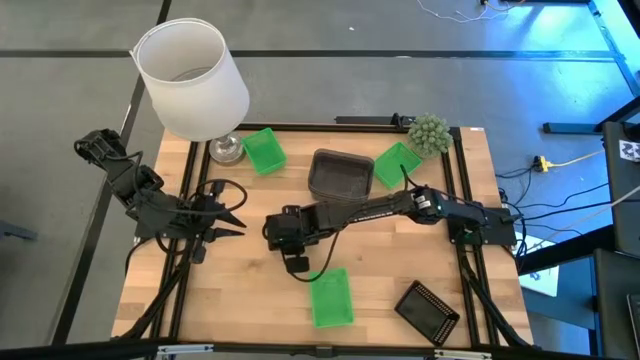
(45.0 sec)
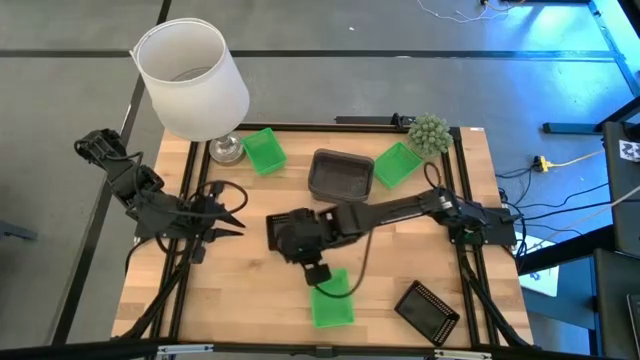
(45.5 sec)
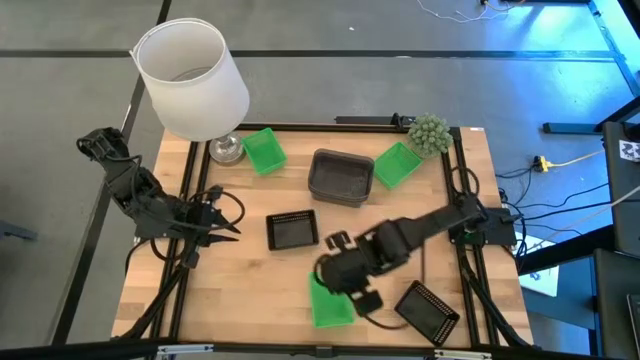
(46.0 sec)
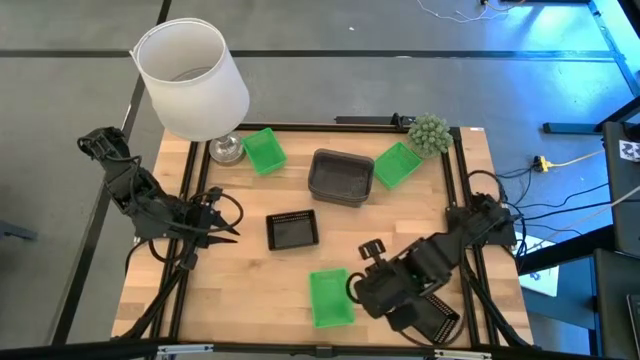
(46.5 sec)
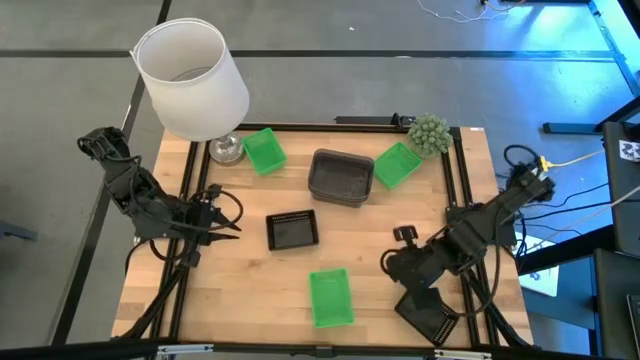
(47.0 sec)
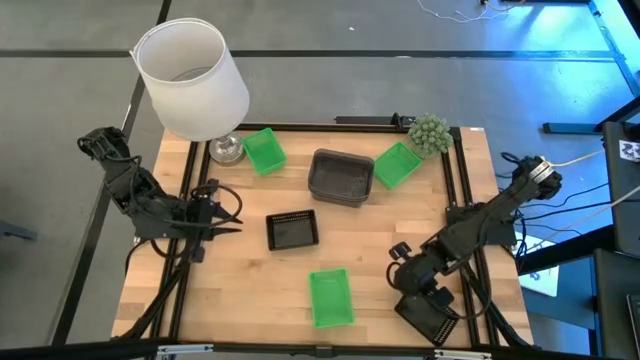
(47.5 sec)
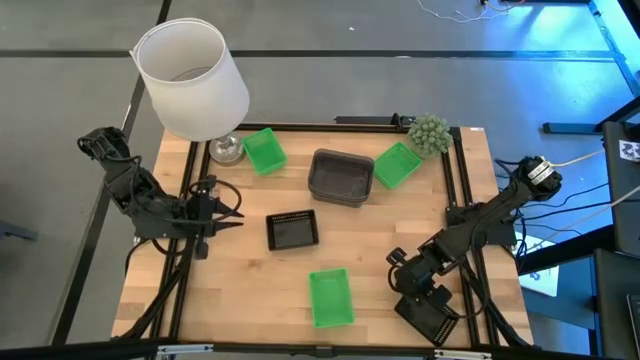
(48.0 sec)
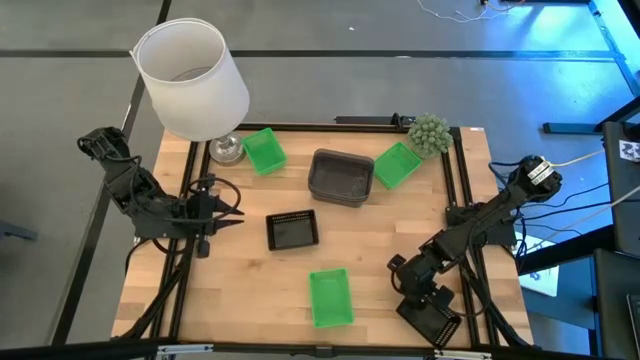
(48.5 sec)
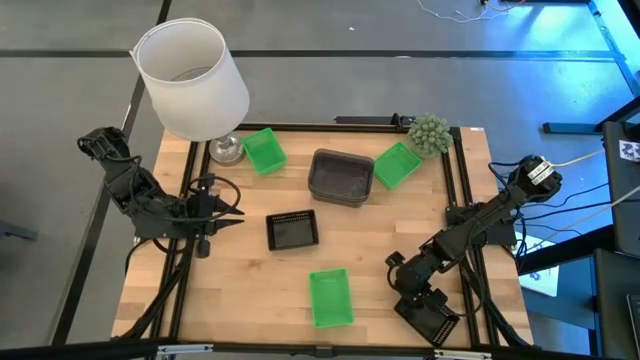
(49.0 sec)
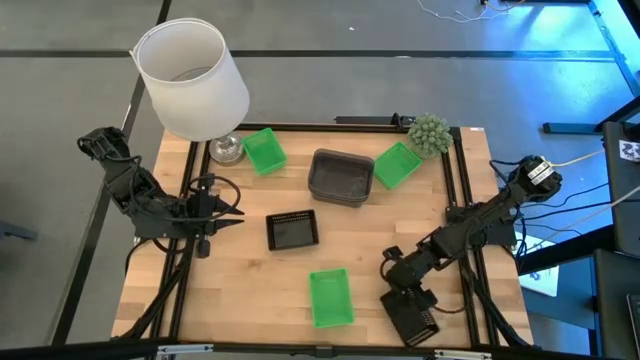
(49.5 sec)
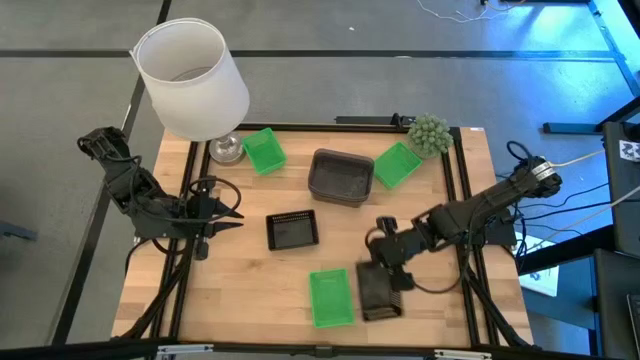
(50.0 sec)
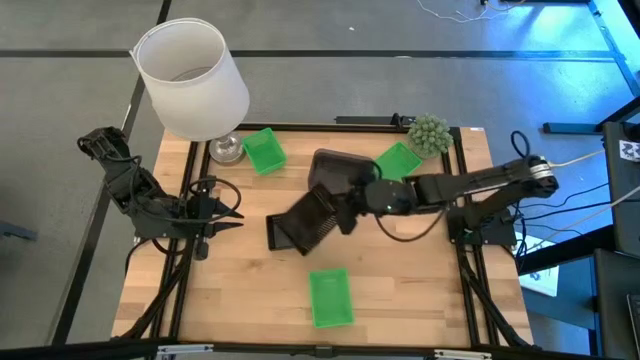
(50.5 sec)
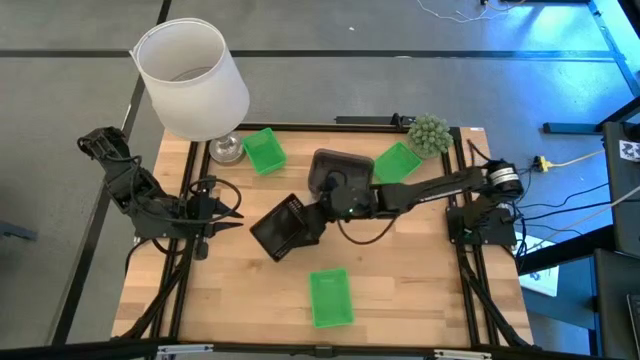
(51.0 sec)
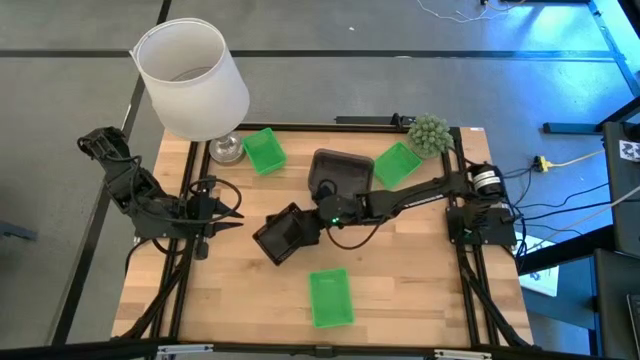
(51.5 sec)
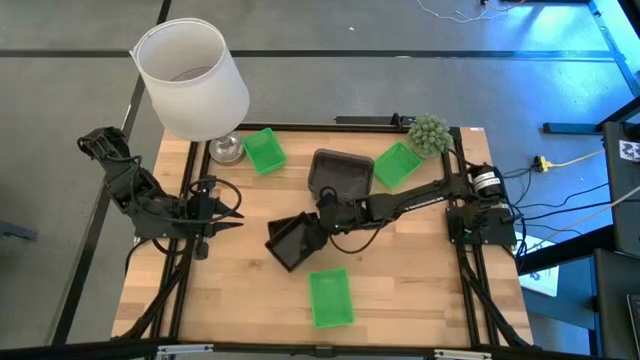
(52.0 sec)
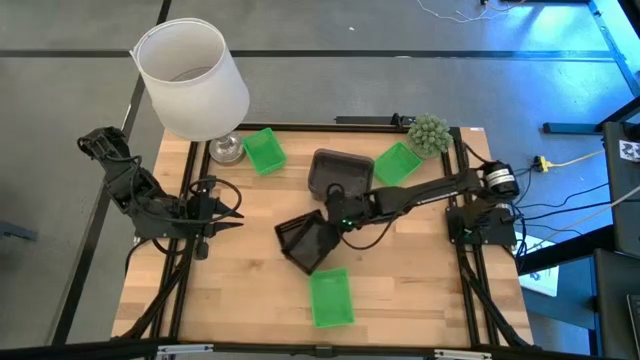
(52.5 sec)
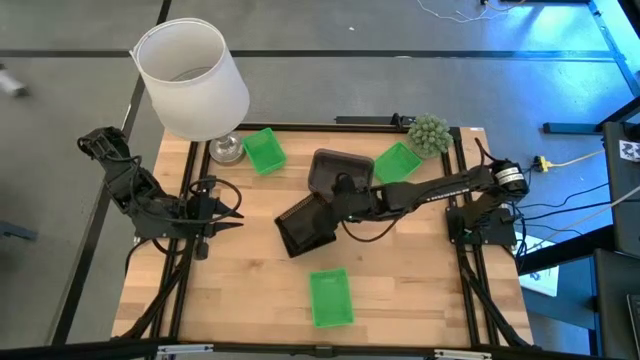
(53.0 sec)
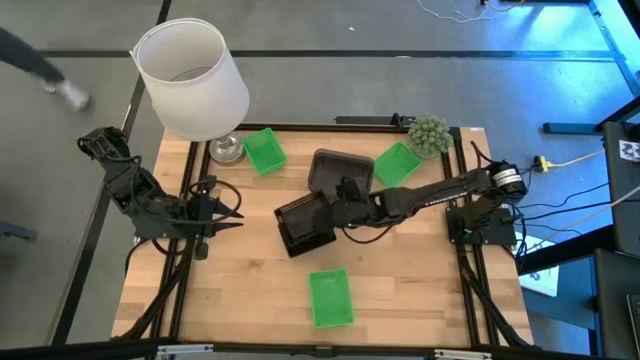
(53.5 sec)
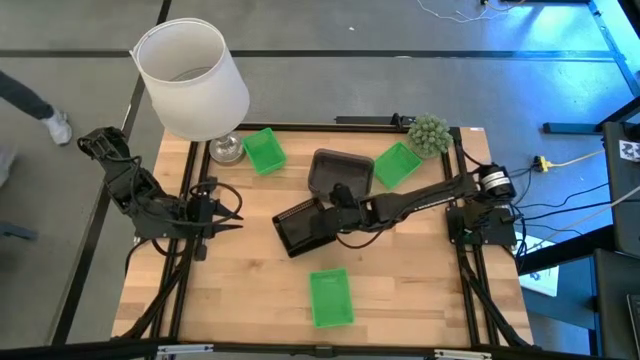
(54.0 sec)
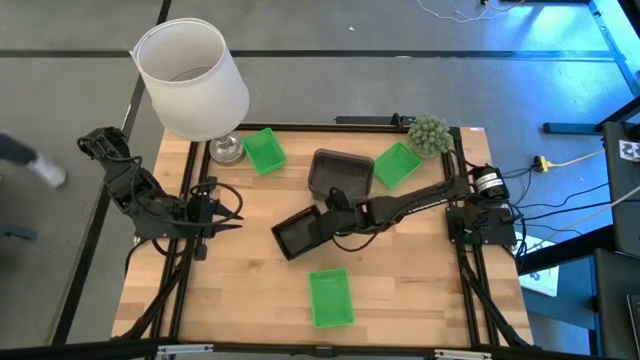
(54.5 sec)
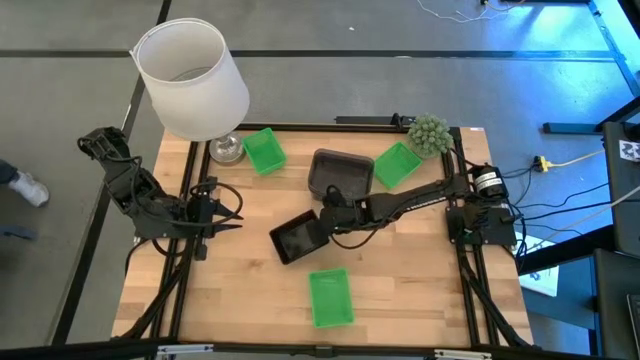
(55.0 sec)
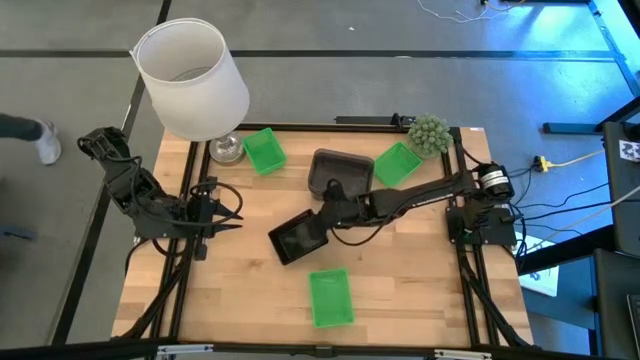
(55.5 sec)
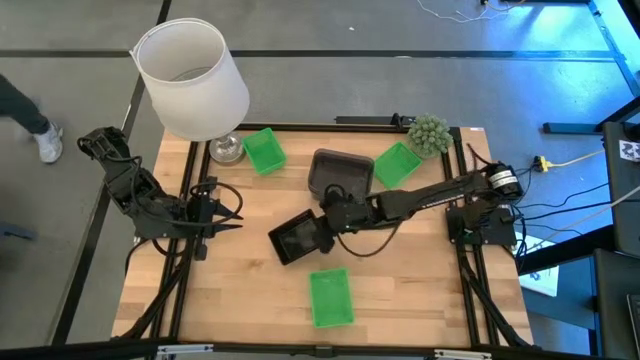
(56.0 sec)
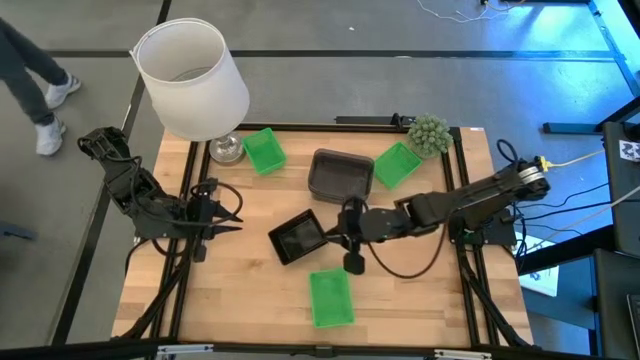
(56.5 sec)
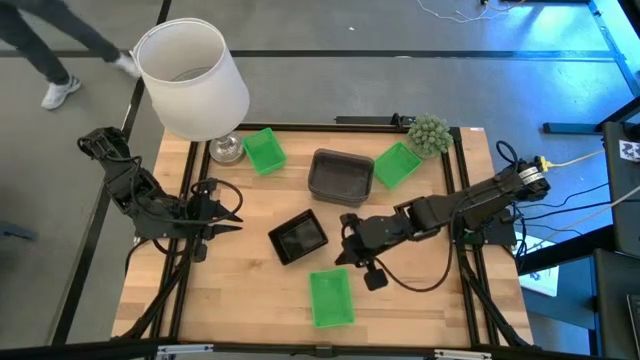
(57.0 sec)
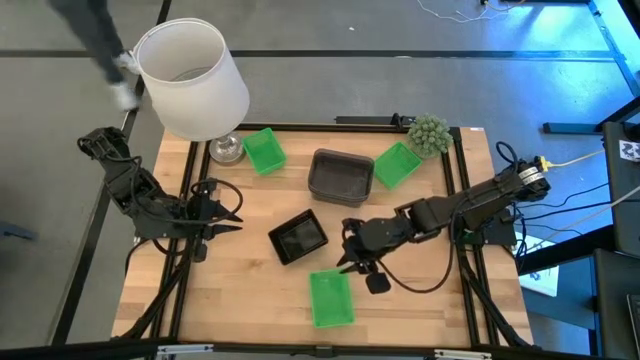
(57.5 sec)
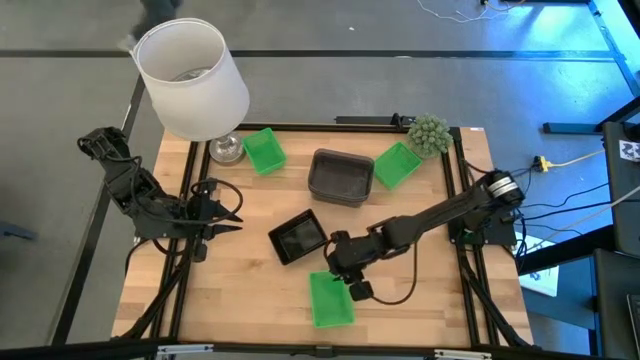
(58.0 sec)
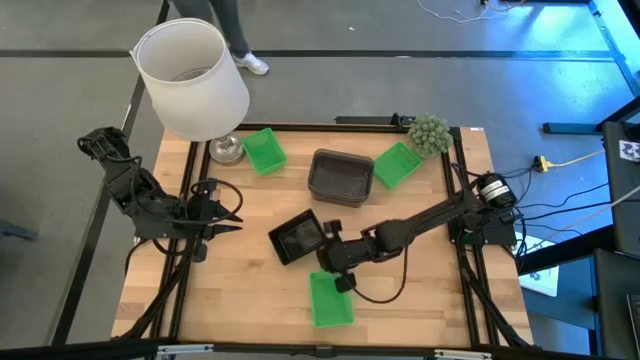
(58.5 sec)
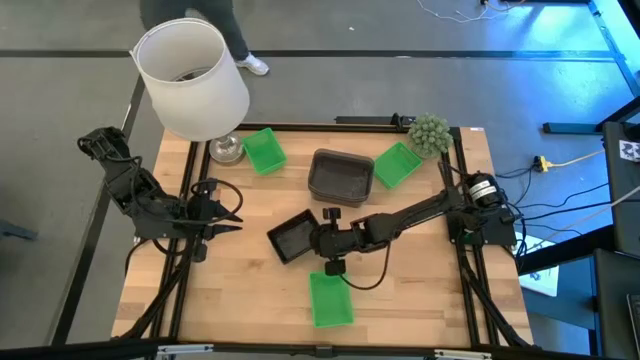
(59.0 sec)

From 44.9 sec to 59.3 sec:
Stack the bottom black basket on top of the top black basket

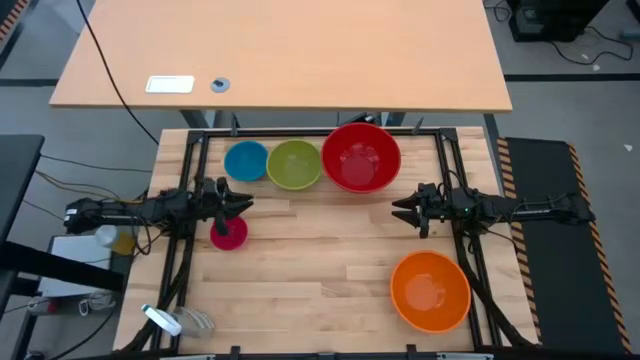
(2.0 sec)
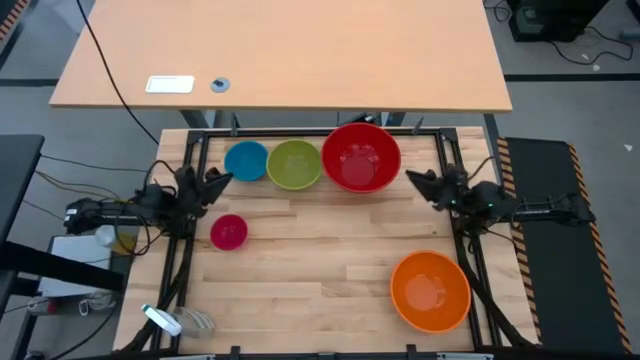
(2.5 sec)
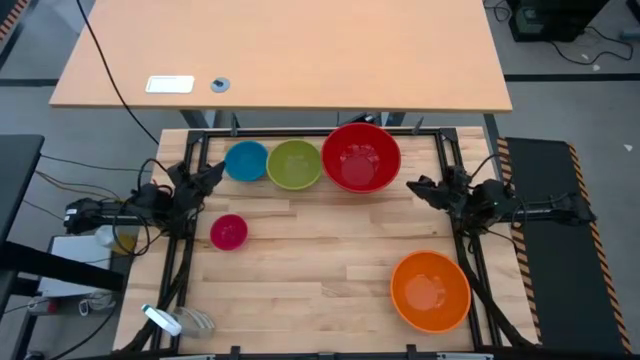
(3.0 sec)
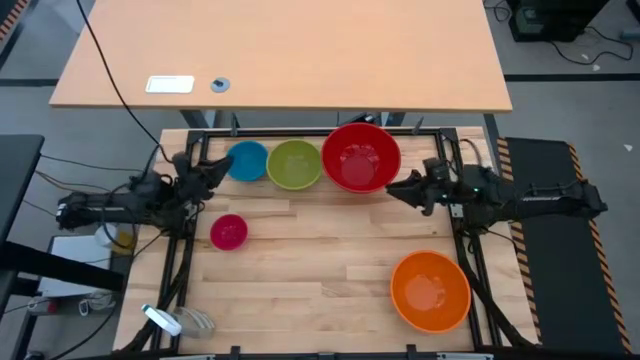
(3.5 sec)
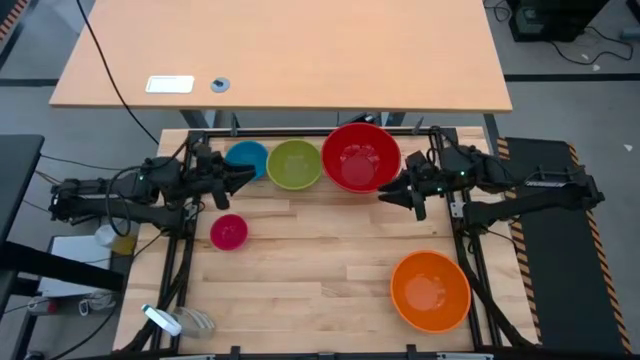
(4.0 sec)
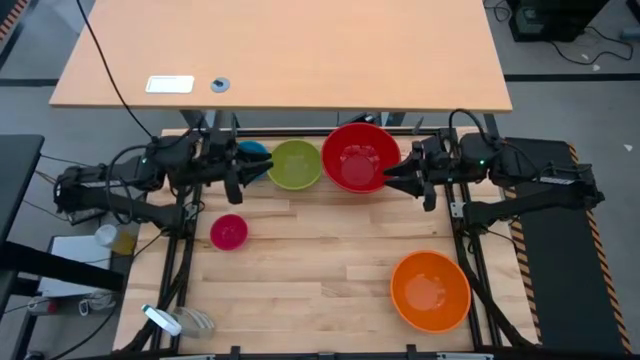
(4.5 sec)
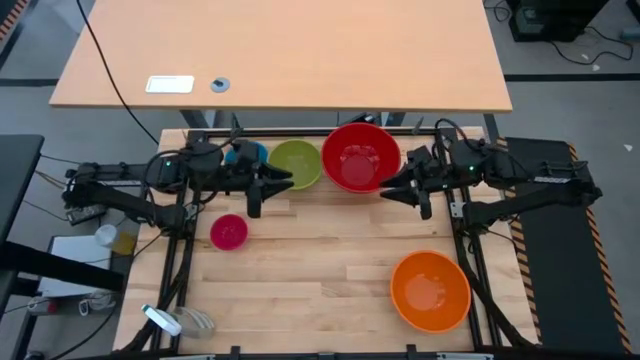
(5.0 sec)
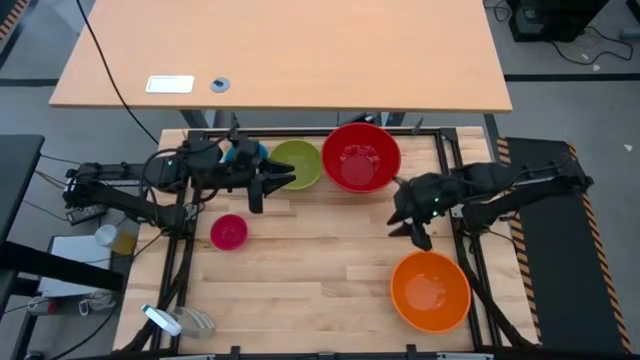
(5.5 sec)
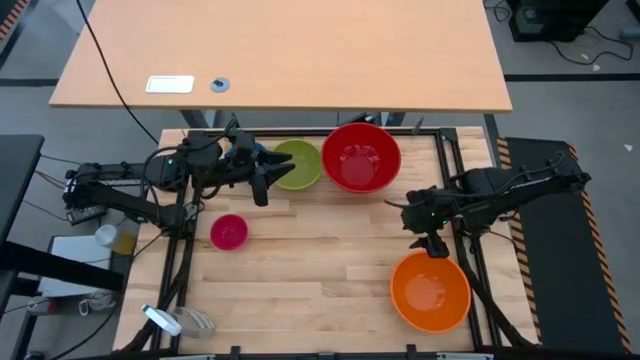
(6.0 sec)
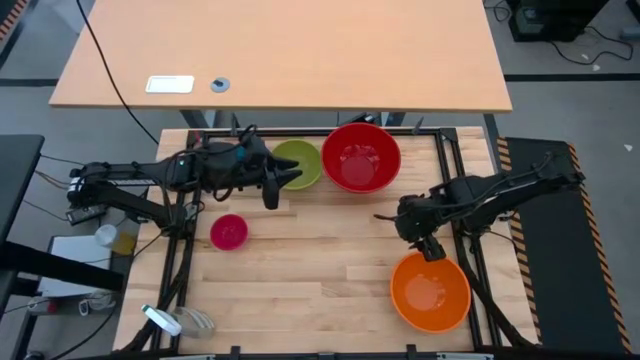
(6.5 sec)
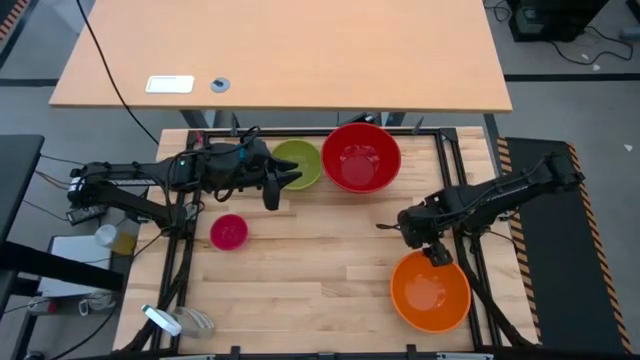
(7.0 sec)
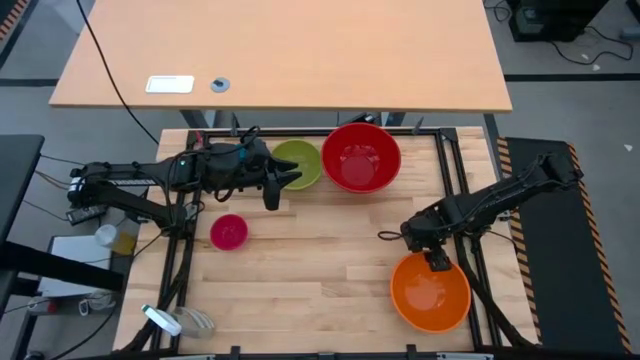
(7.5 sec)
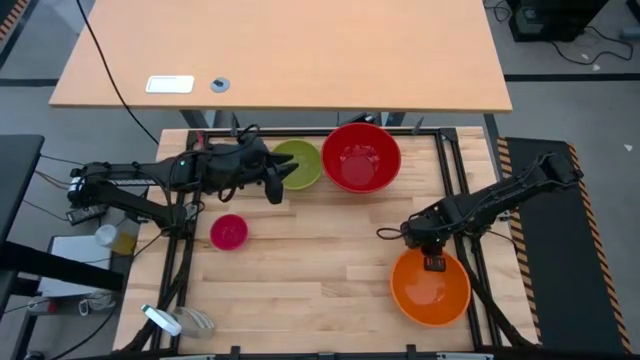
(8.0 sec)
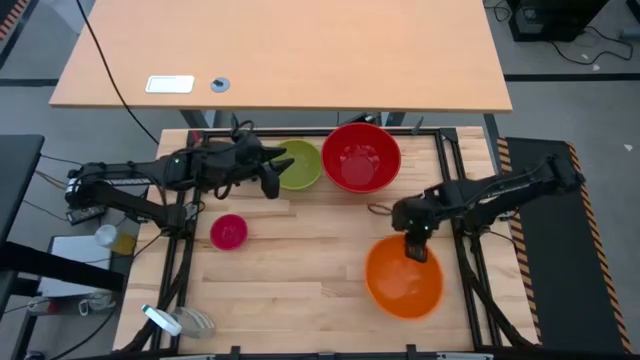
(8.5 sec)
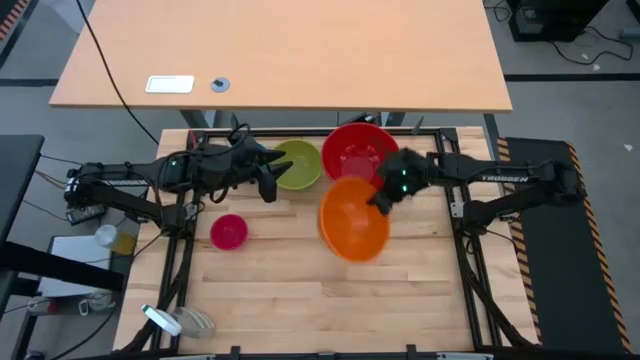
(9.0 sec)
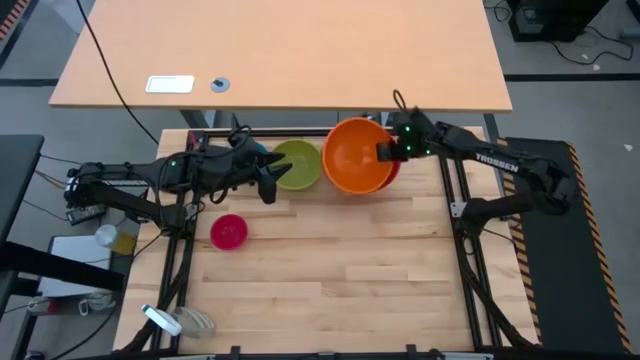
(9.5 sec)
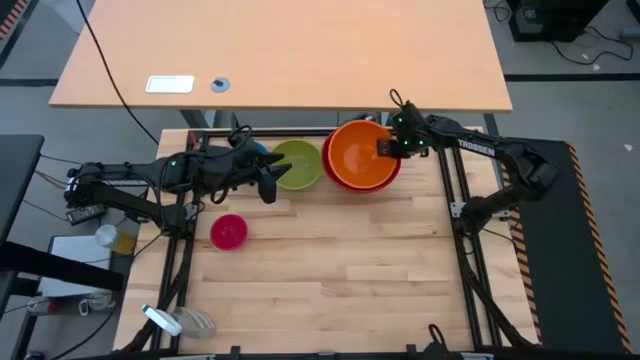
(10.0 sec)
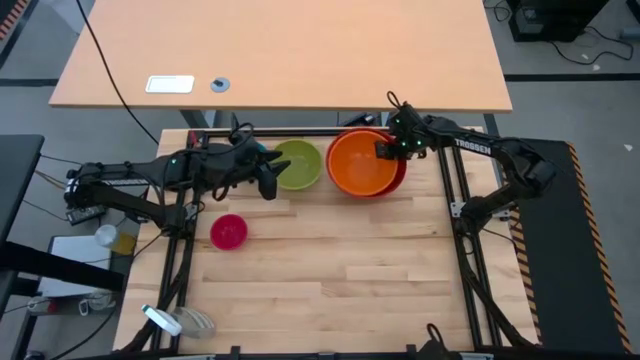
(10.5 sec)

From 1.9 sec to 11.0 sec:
Stack the orange bowl on top of the red bowl
